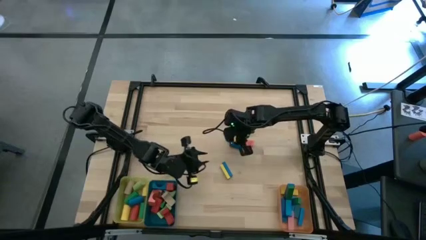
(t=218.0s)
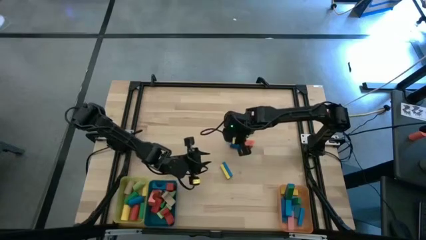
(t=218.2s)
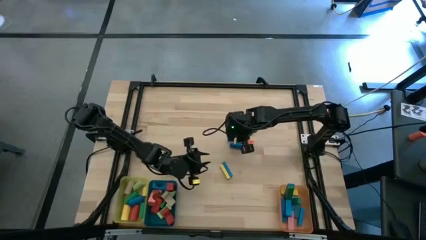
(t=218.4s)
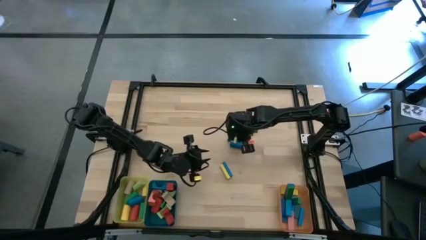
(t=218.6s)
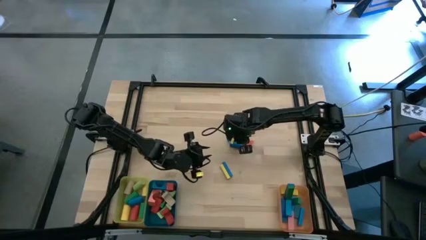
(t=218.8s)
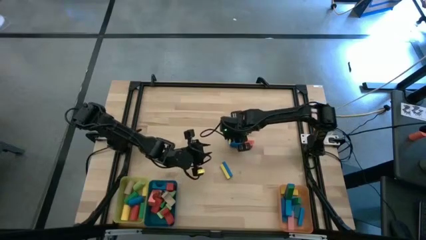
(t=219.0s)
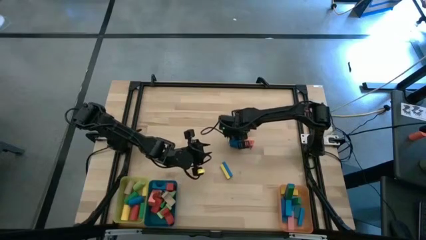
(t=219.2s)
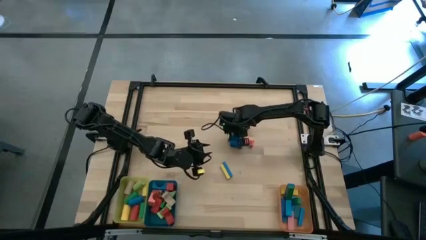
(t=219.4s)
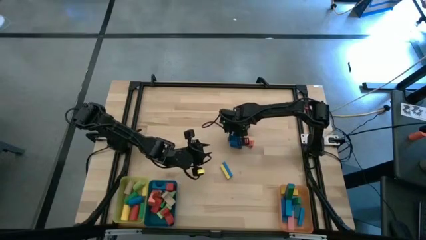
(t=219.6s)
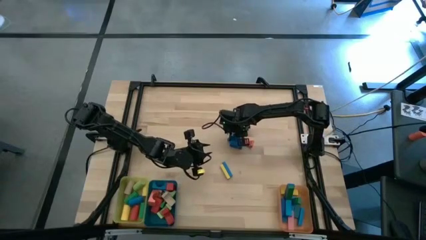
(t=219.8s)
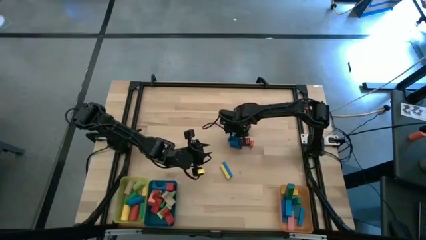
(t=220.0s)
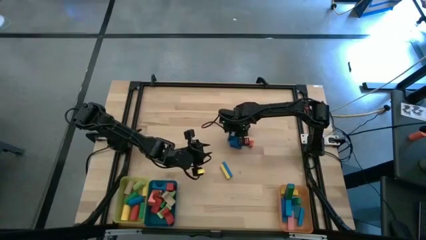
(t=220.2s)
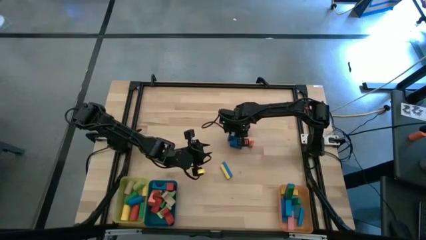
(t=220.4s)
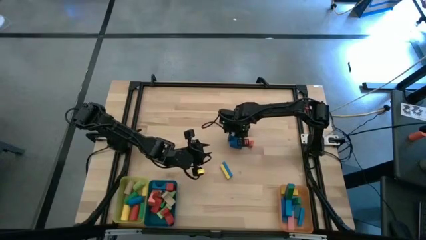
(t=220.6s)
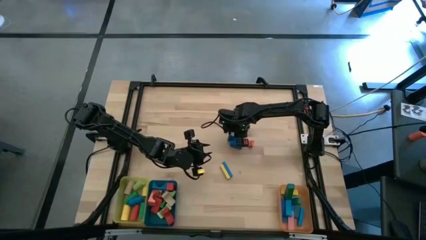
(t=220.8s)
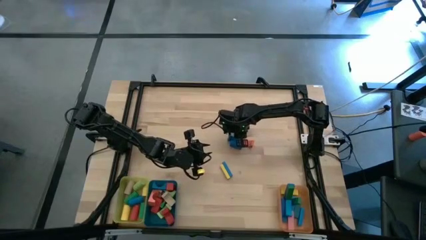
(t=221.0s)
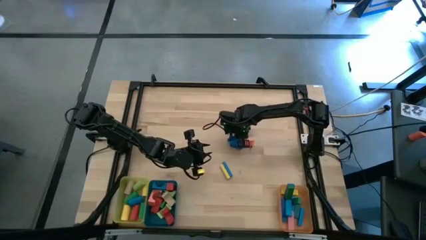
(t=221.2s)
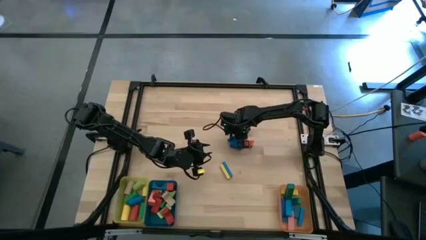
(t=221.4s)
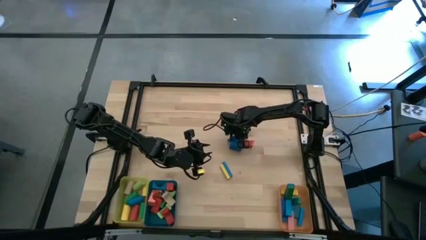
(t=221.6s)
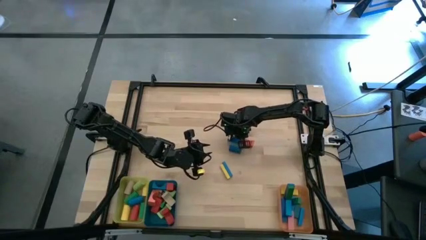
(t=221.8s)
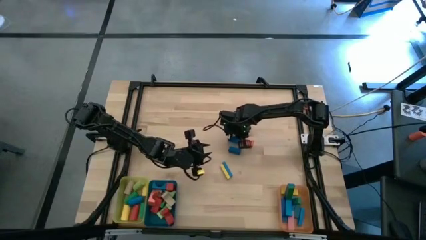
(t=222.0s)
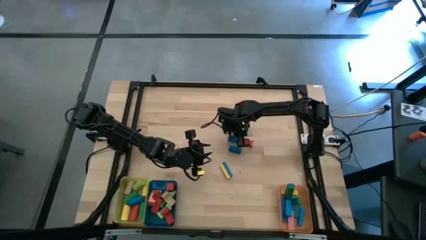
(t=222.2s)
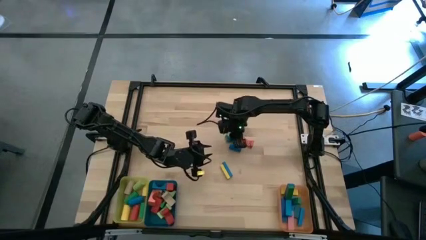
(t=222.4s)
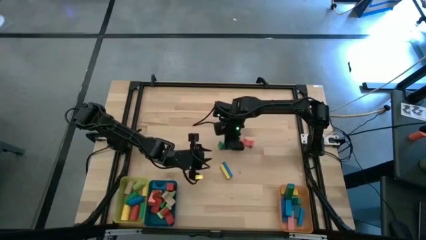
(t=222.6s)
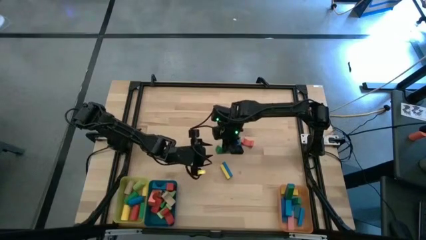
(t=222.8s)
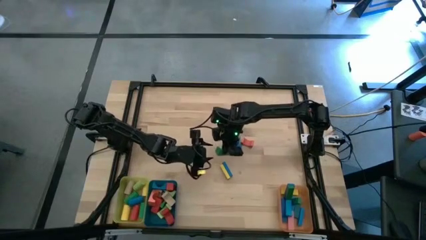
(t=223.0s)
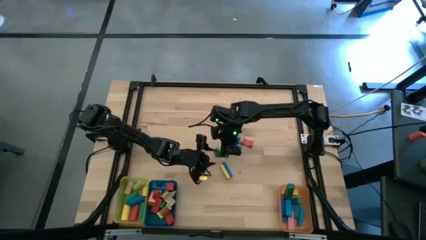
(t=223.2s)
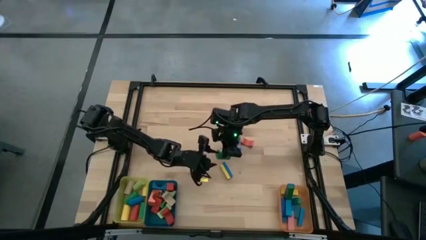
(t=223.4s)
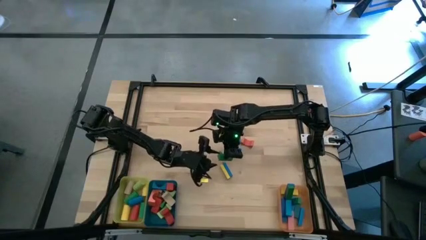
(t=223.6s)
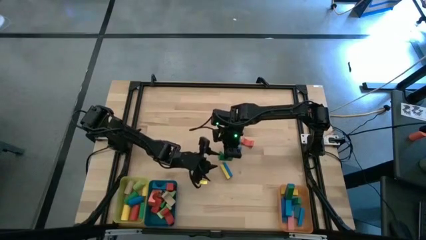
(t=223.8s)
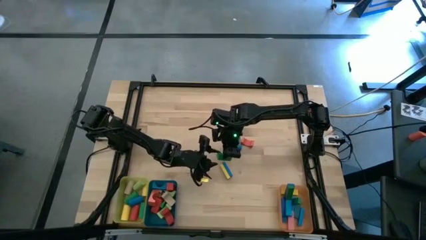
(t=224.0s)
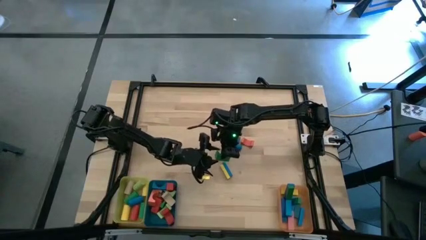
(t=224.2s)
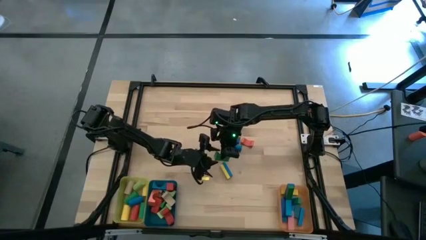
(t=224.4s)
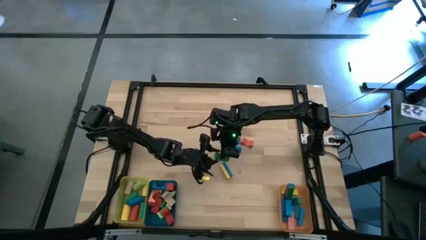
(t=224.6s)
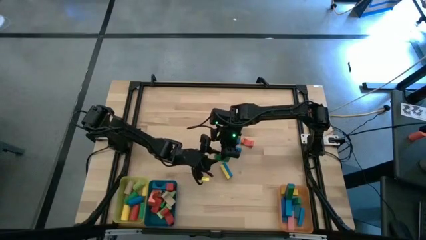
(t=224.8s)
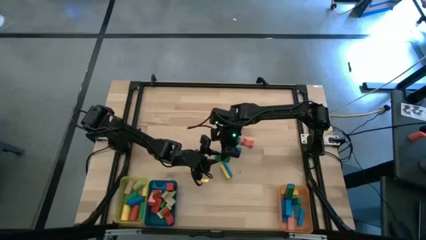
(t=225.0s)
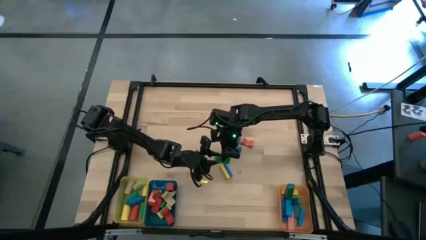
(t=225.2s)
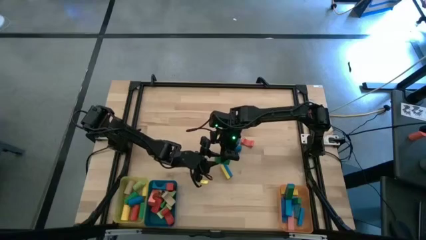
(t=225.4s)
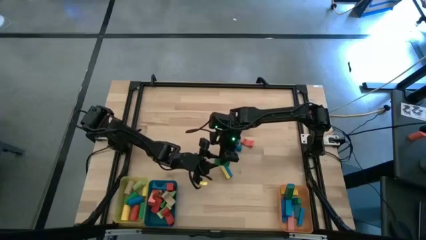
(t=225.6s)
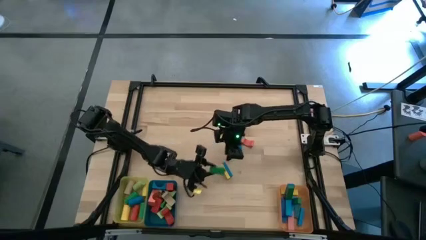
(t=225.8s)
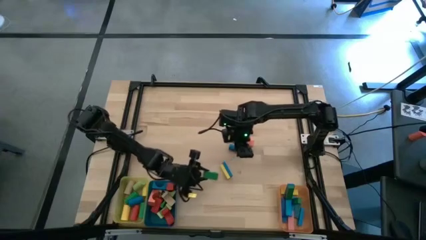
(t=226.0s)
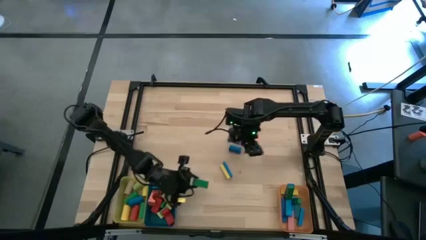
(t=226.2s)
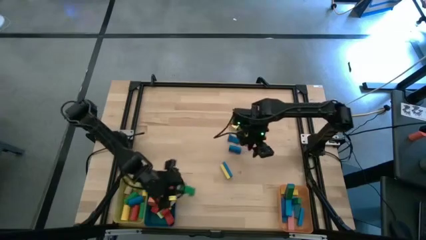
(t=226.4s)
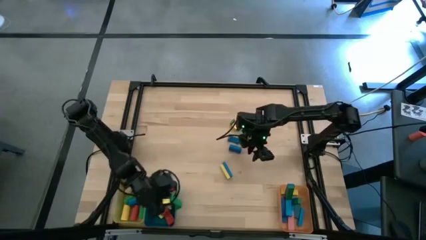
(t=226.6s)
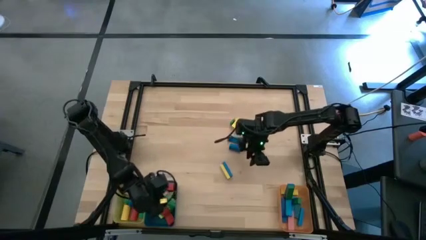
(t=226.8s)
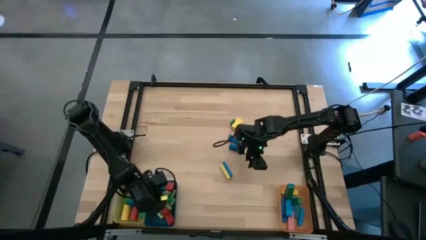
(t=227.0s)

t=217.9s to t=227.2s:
Task: Sort blocks by size
Put the green arch block into the blue bin

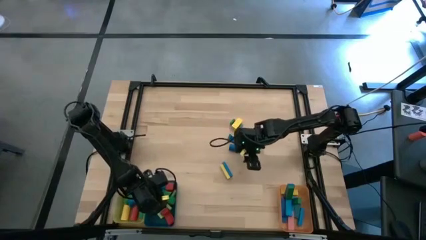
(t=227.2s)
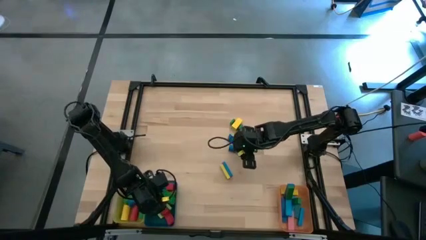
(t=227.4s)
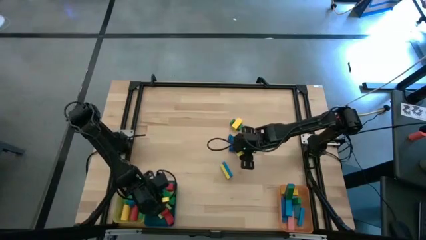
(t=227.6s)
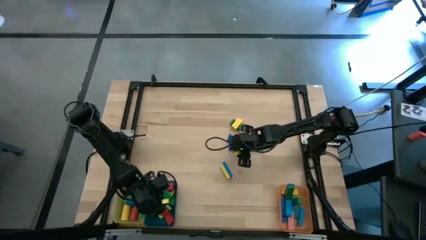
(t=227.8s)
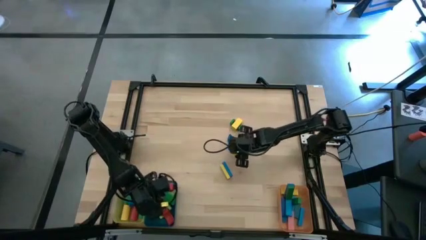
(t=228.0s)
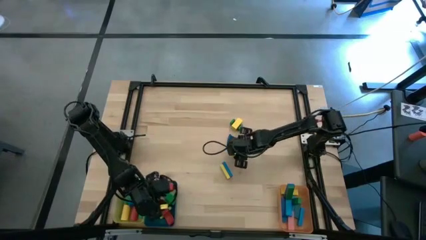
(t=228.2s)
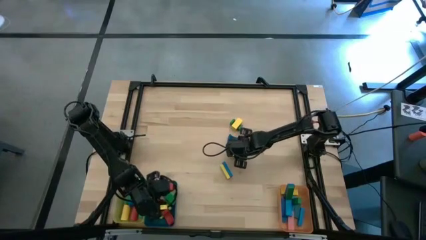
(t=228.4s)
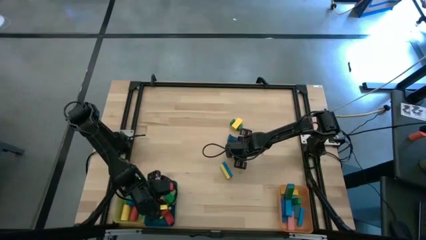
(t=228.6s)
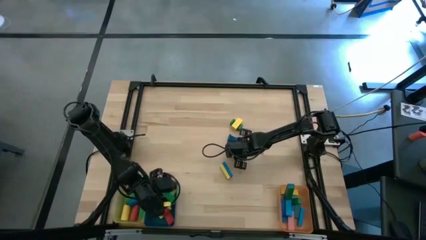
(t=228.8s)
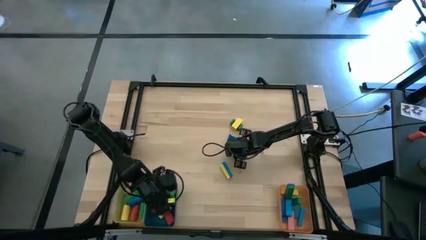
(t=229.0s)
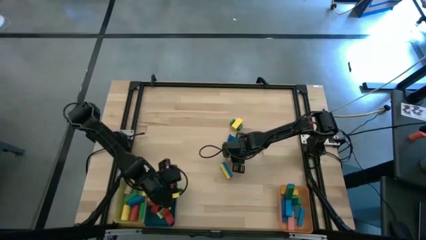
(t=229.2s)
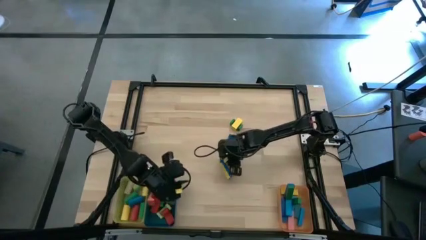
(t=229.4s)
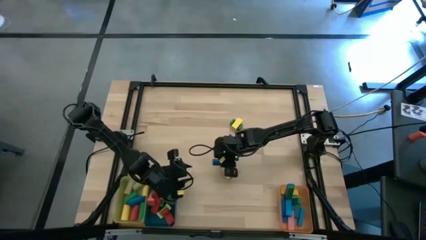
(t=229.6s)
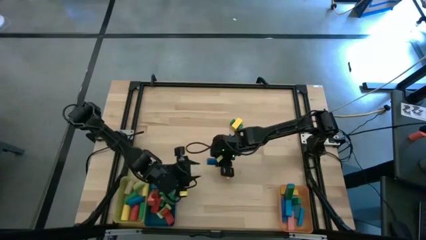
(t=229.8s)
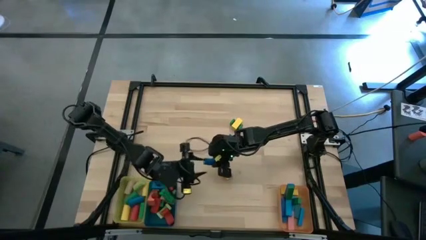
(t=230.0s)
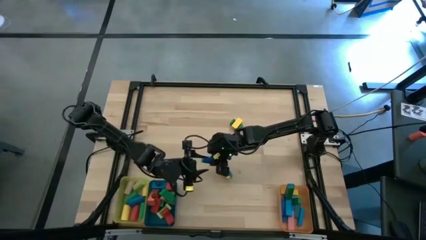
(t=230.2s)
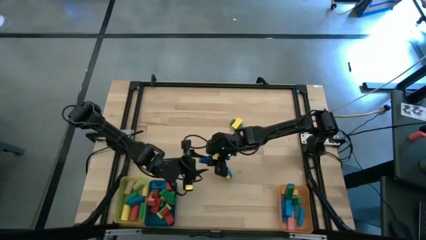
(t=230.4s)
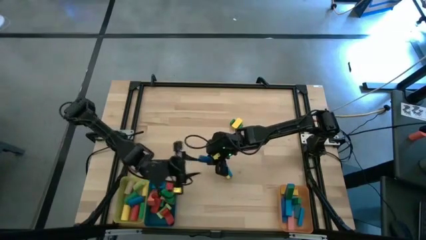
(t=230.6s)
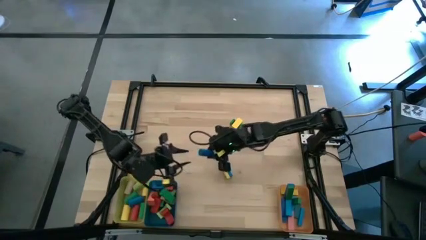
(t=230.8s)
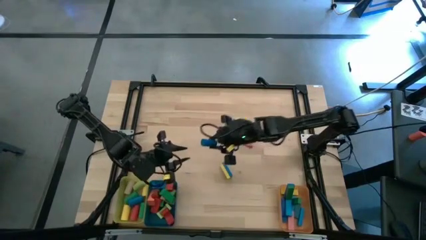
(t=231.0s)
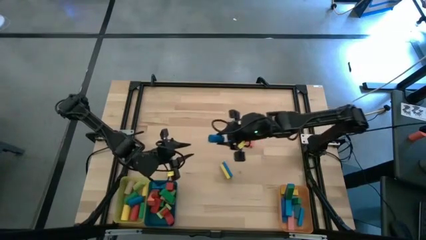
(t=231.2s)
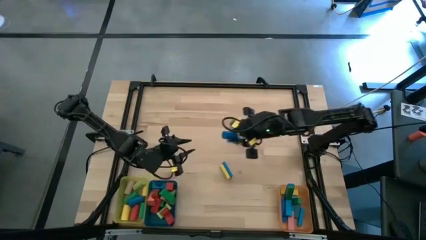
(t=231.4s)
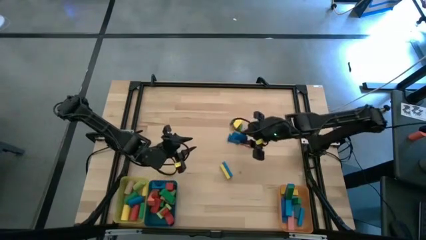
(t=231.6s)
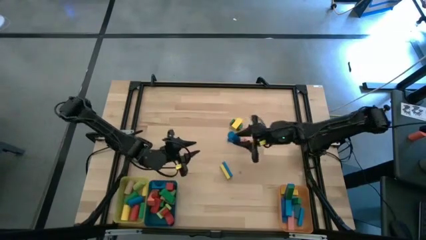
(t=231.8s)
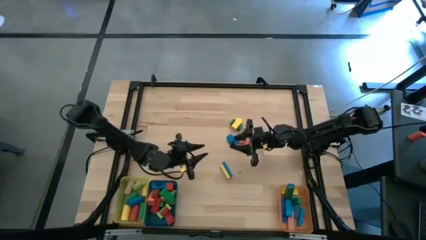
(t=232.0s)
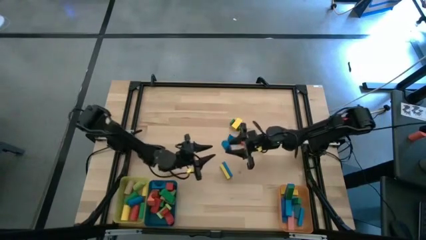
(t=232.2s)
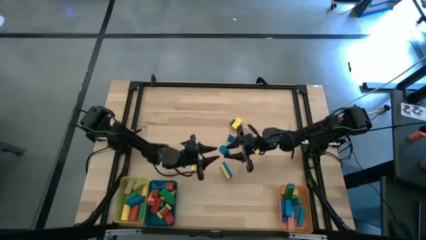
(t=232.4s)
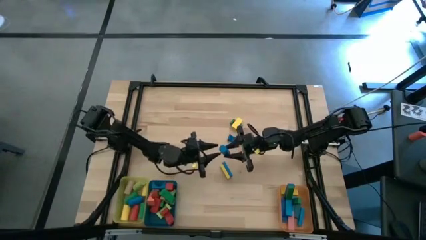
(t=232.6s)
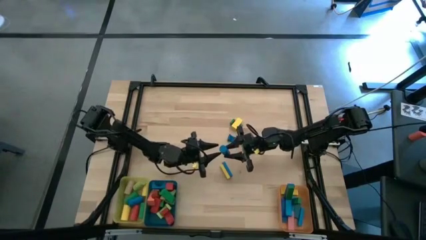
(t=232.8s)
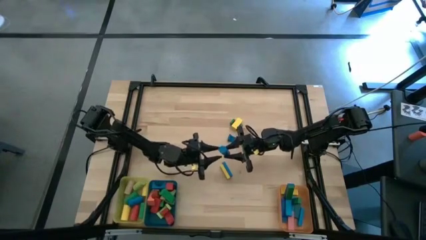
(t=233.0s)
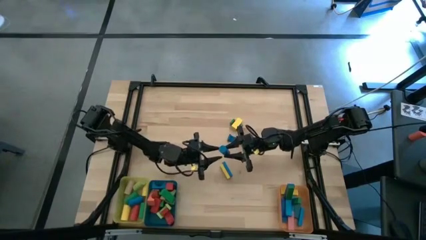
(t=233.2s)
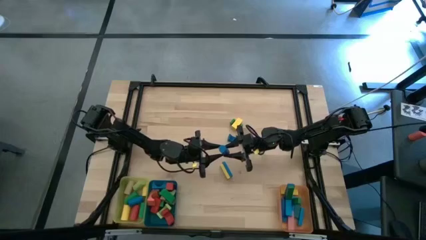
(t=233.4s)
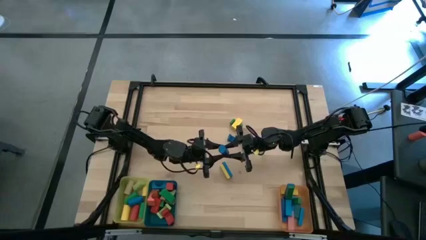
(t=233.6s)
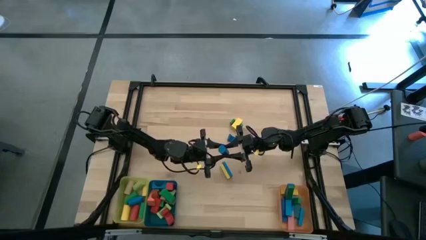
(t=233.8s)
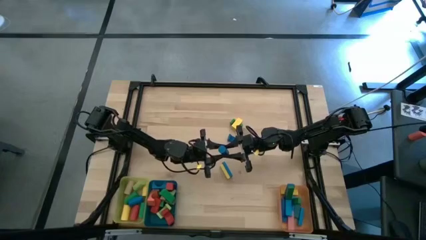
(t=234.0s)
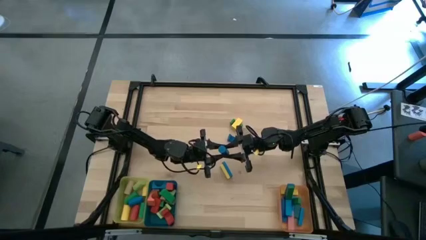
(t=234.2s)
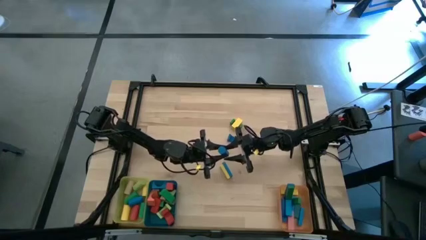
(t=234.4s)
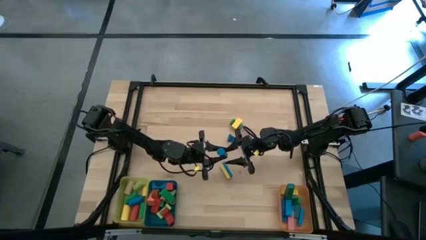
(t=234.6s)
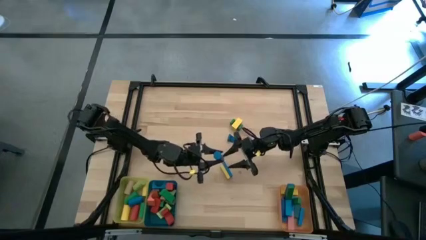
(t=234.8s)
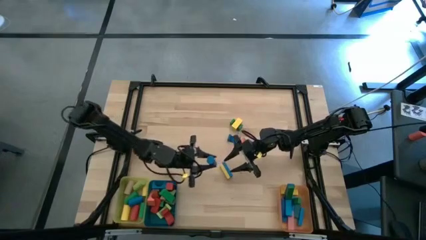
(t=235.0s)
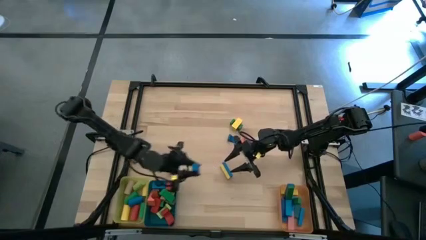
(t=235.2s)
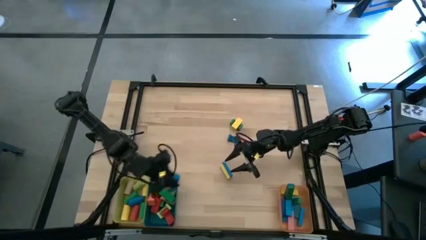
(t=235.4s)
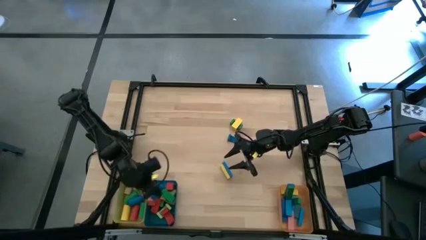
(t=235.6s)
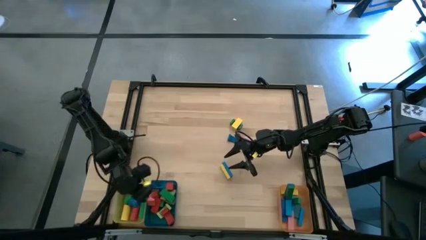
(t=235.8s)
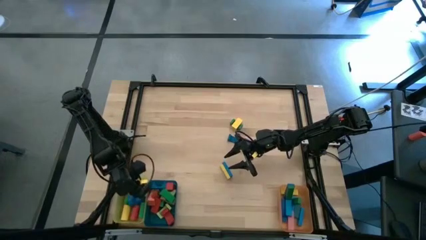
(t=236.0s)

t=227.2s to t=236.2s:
Put the blue cylindrical block into the yellow bin
